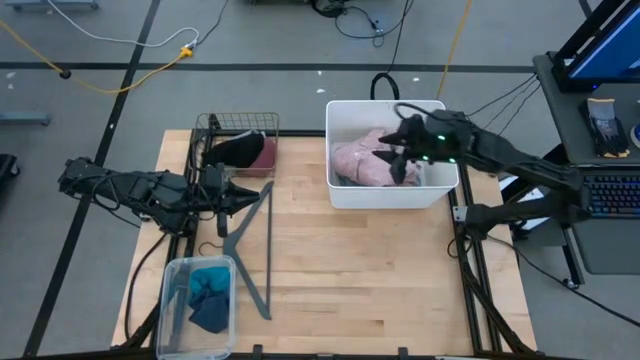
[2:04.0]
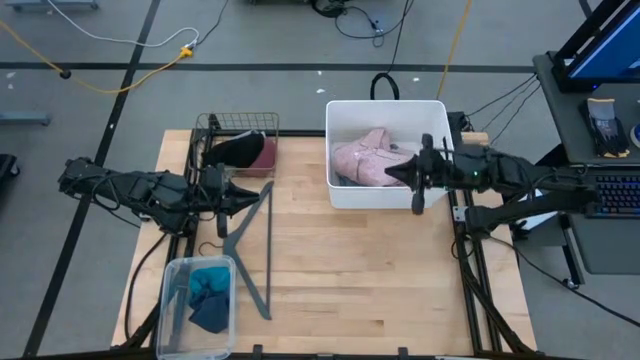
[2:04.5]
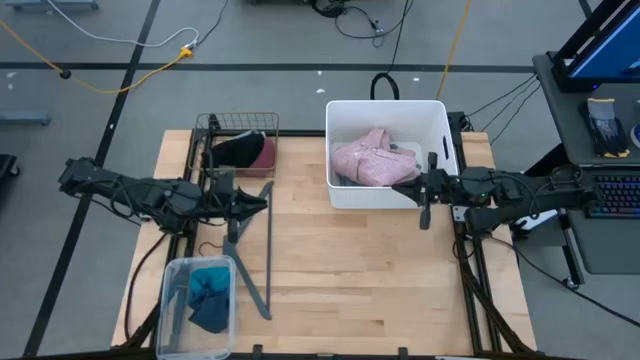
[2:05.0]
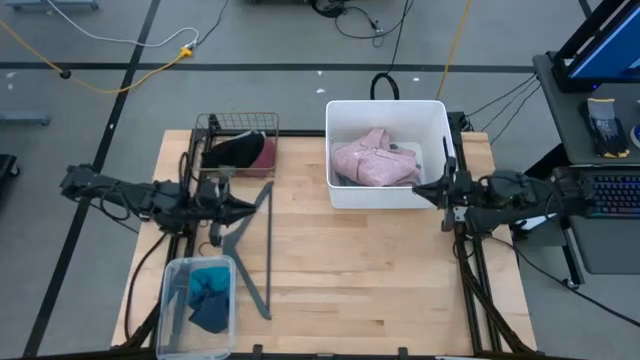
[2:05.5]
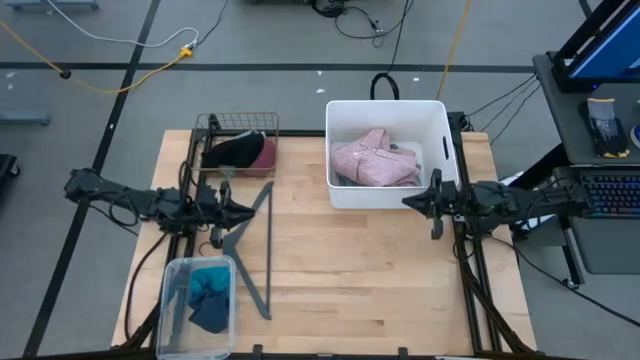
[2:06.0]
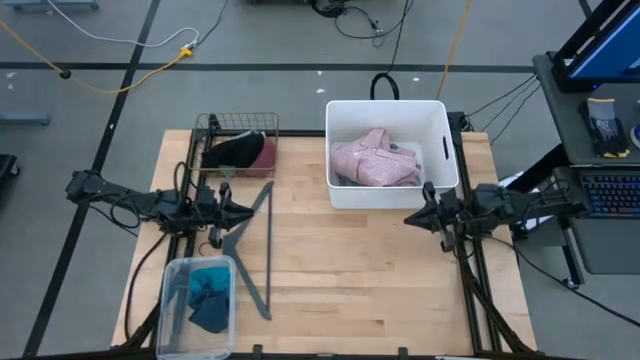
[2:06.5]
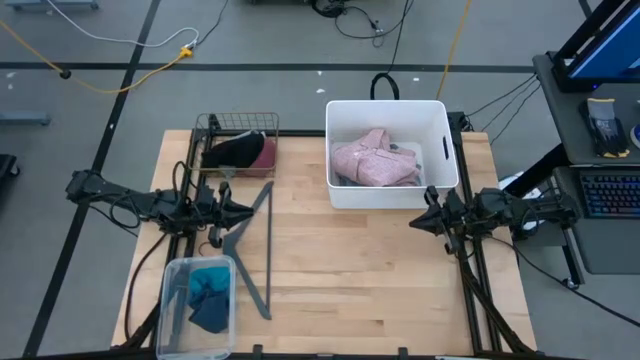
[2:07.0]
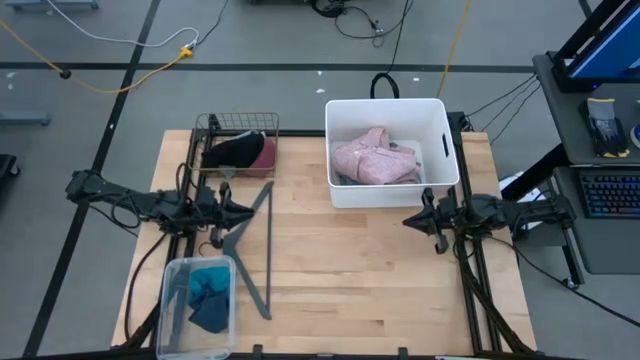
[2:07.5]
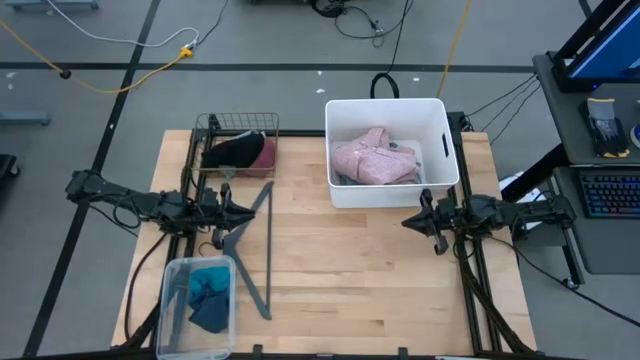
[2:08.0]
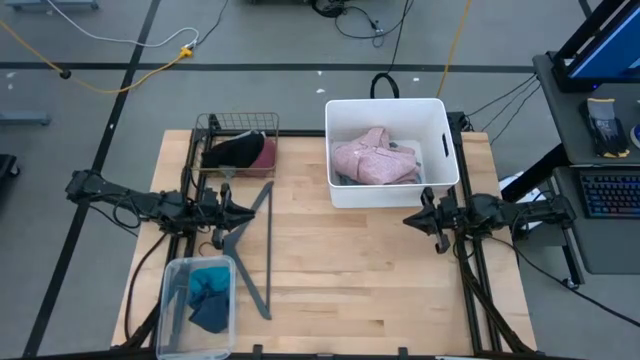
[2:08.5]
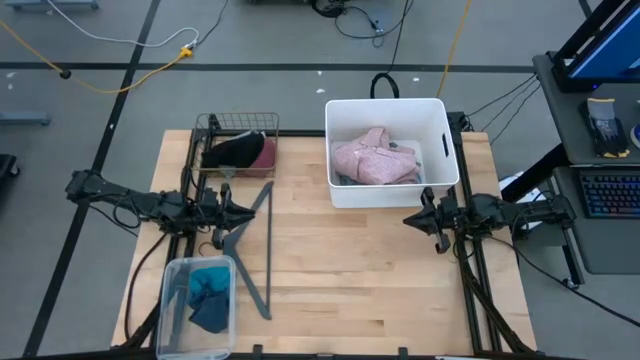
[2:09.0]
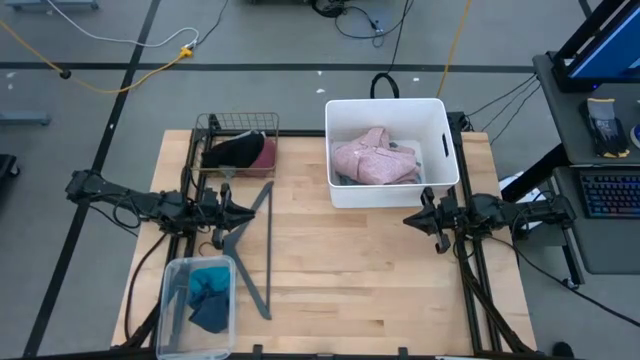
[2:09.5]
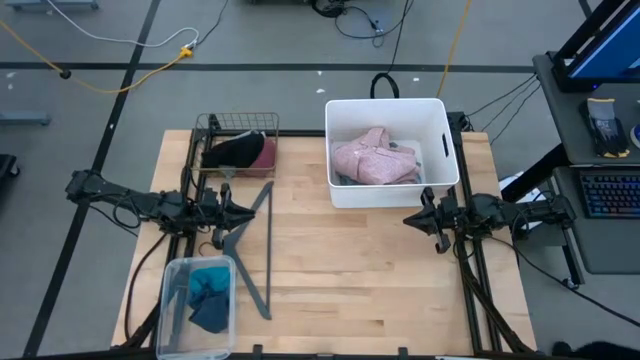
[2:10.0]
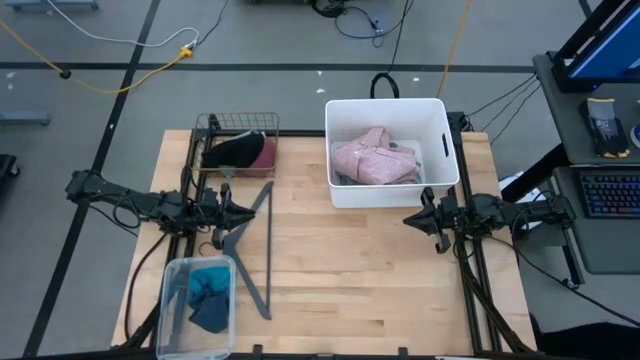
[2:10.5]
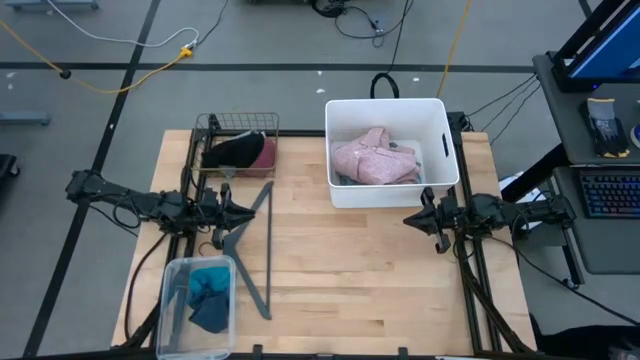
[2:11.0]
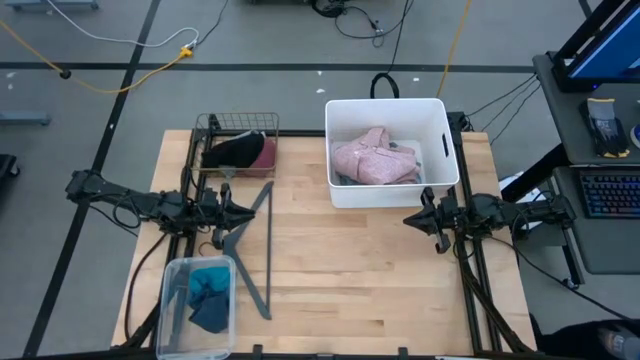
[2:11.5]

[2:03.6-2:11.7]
Task: Pick & Place Cloths
Return to Home Position

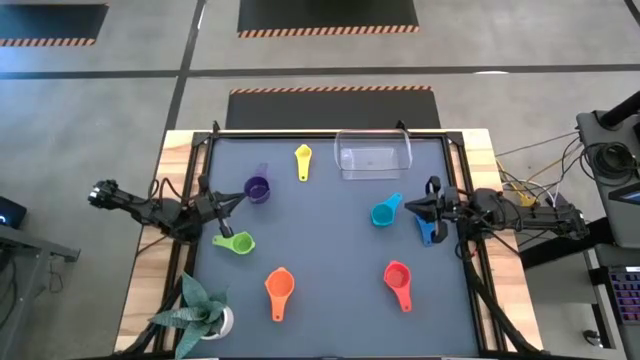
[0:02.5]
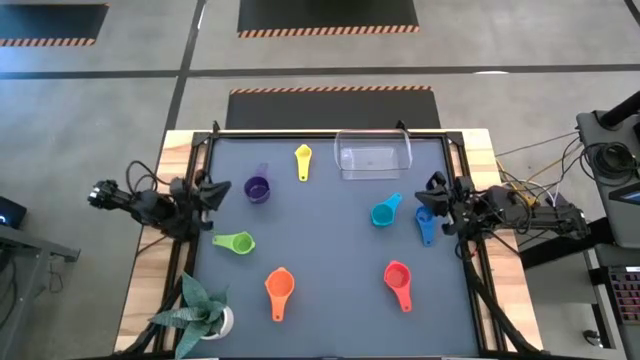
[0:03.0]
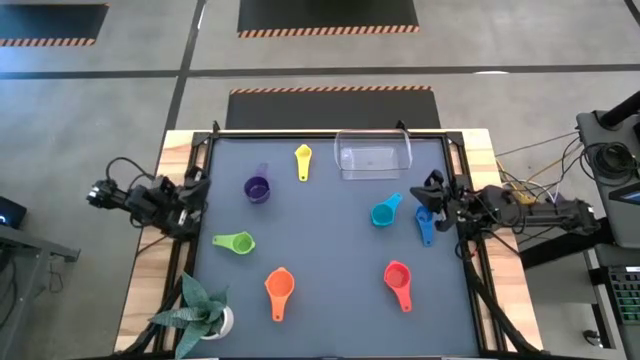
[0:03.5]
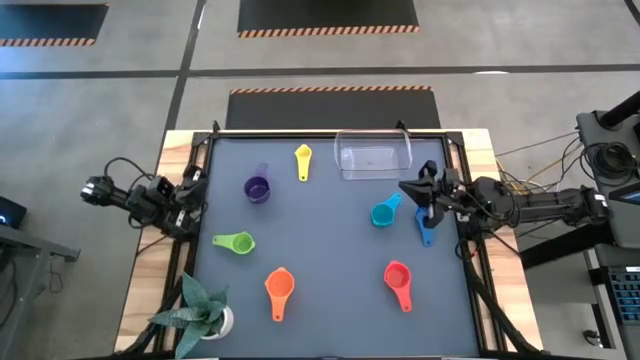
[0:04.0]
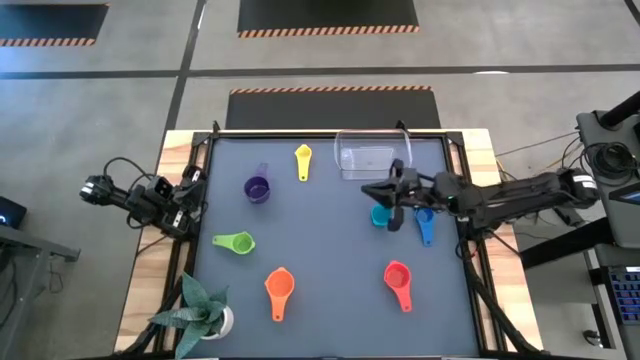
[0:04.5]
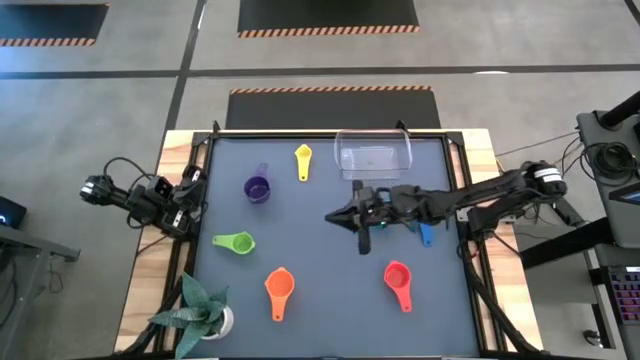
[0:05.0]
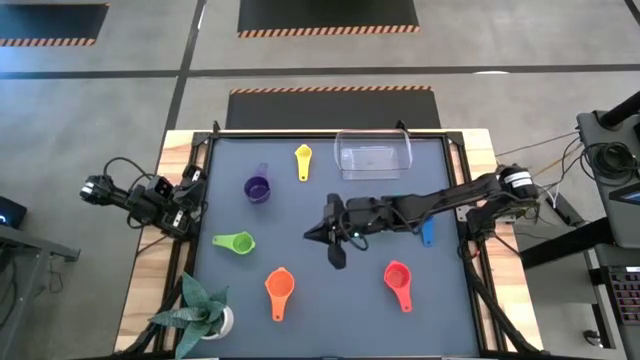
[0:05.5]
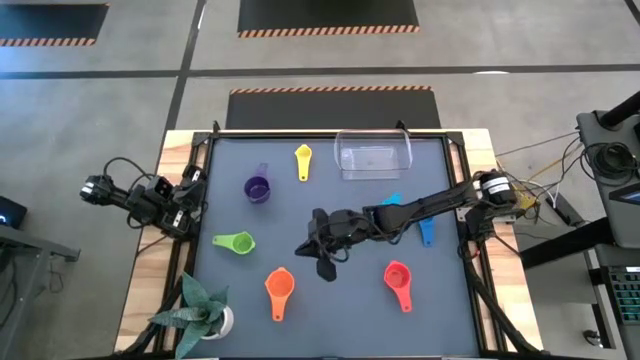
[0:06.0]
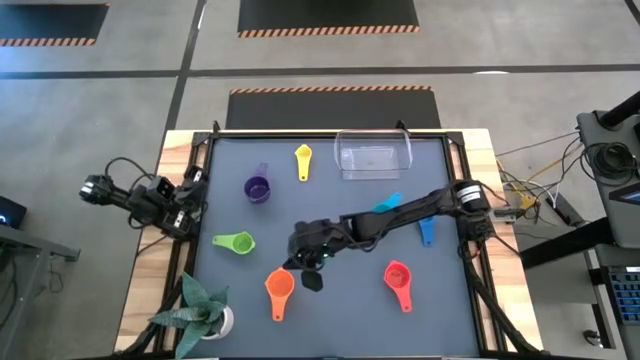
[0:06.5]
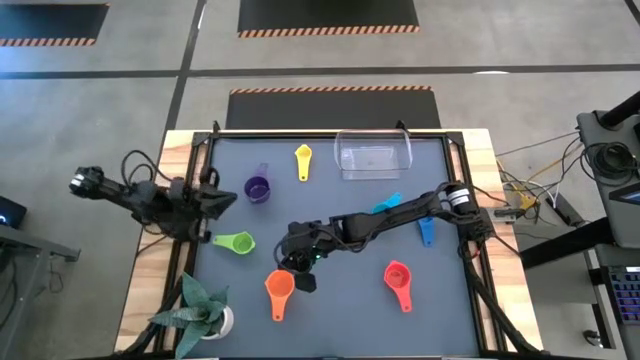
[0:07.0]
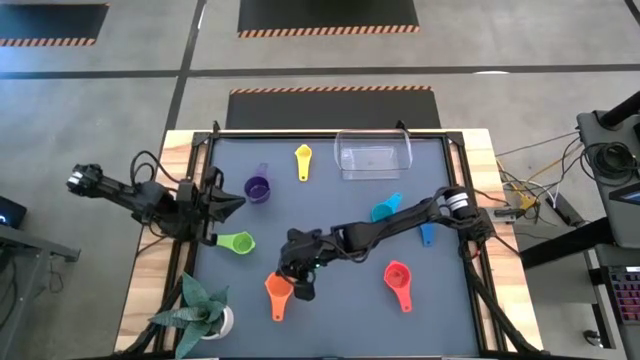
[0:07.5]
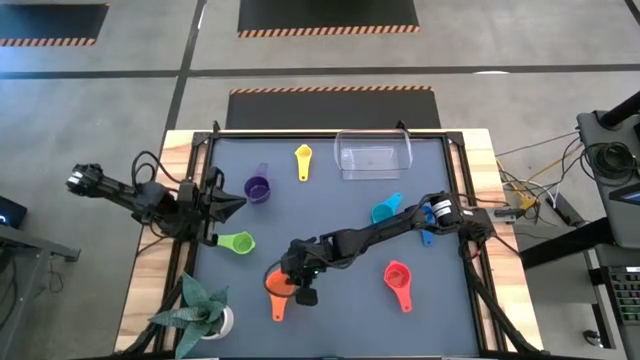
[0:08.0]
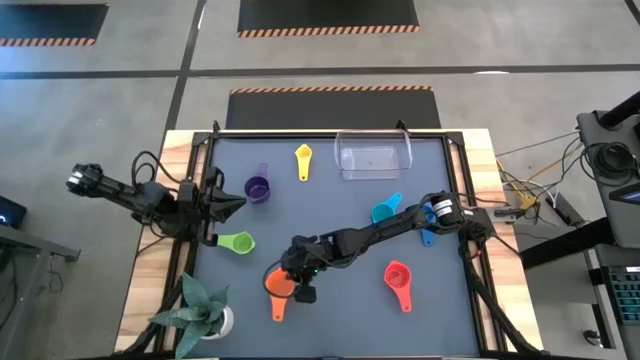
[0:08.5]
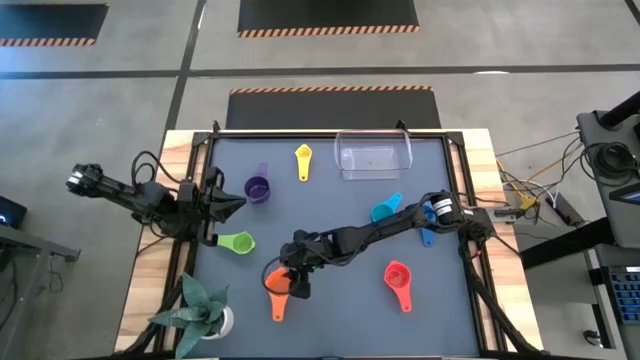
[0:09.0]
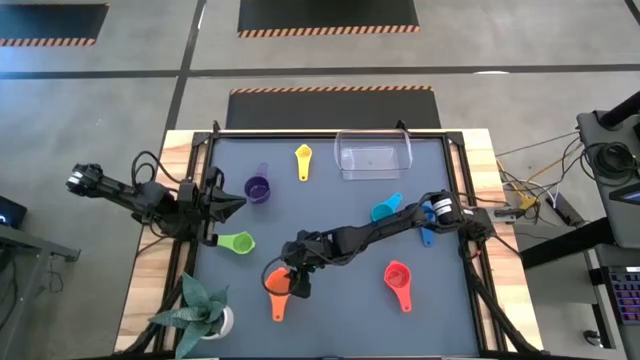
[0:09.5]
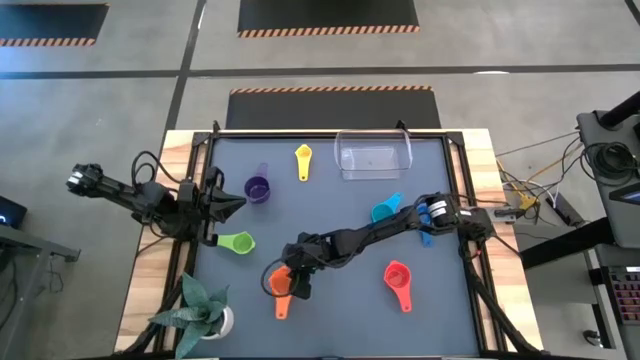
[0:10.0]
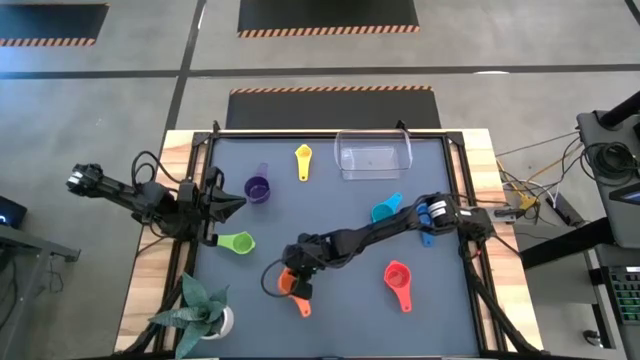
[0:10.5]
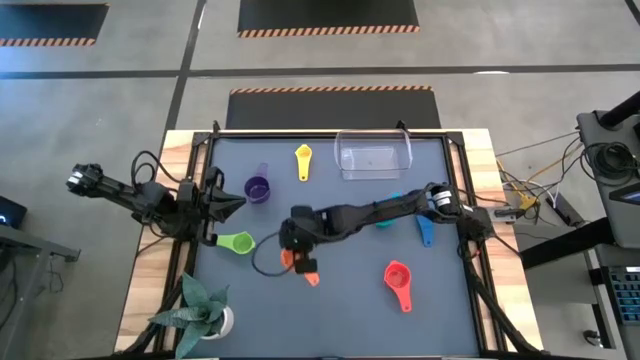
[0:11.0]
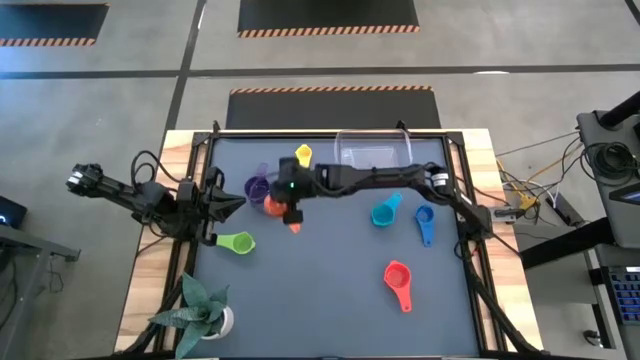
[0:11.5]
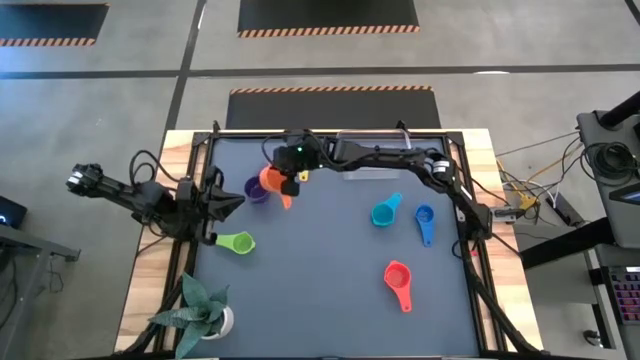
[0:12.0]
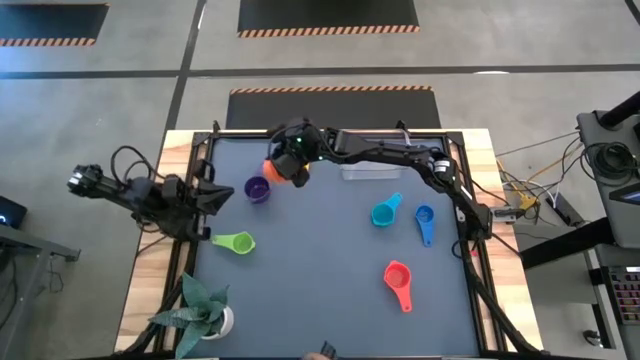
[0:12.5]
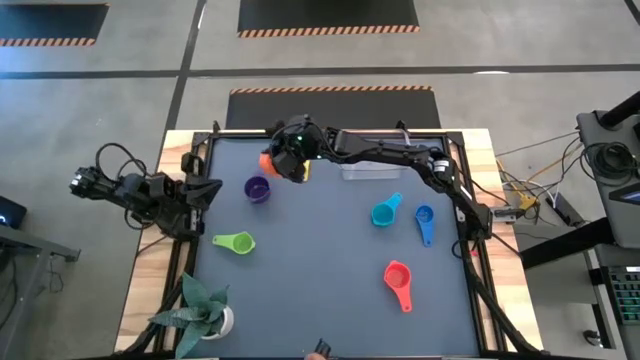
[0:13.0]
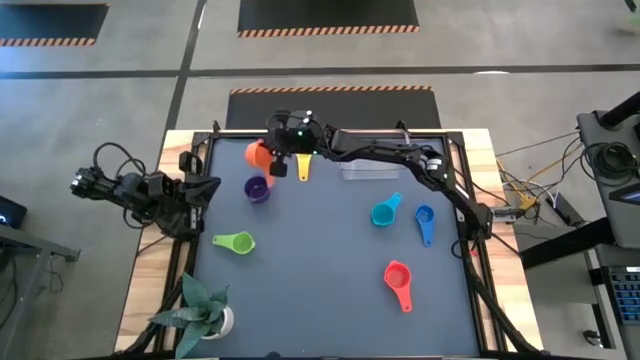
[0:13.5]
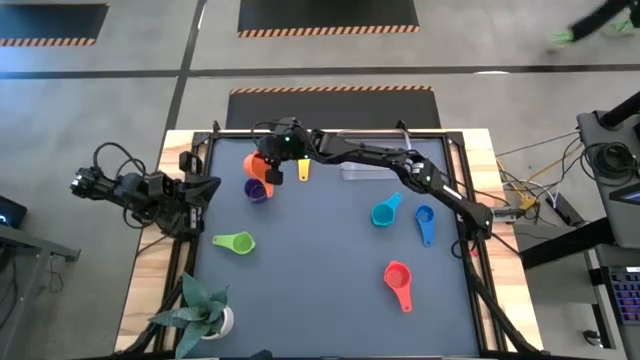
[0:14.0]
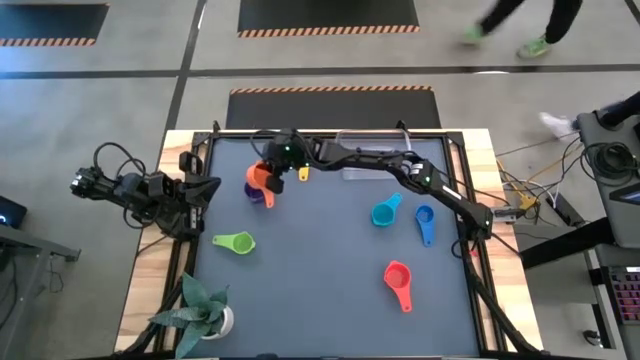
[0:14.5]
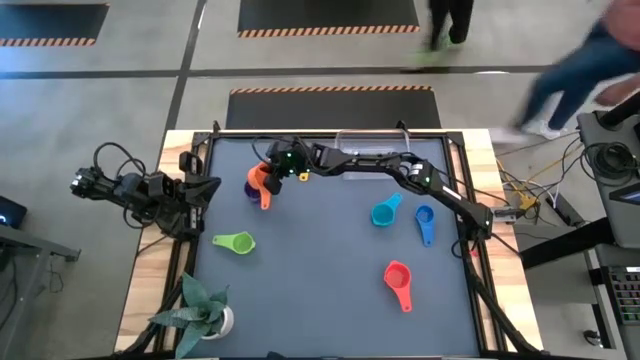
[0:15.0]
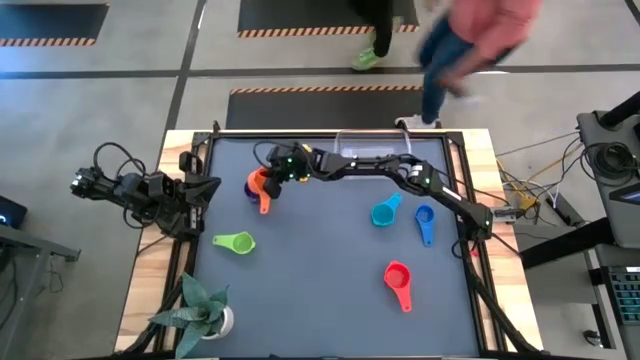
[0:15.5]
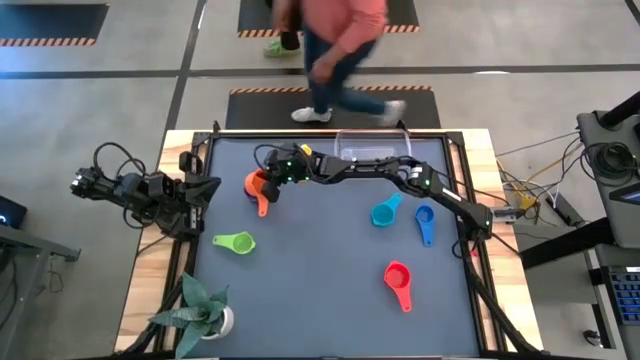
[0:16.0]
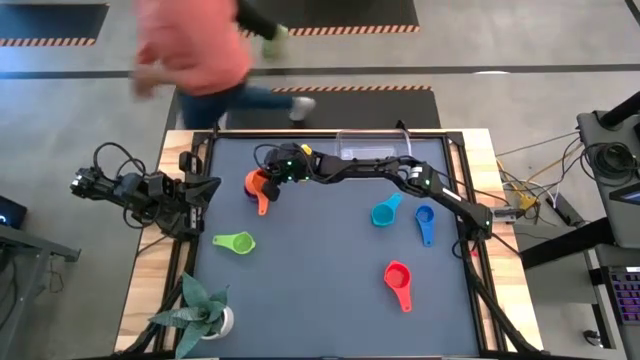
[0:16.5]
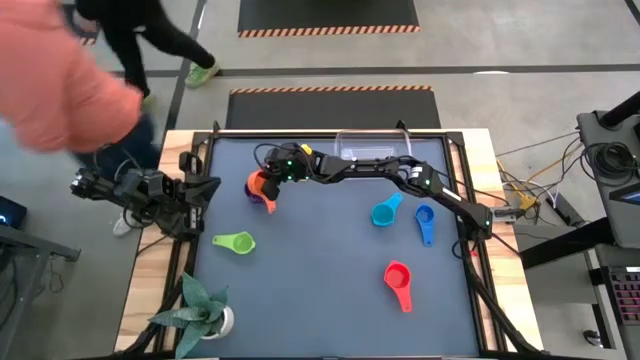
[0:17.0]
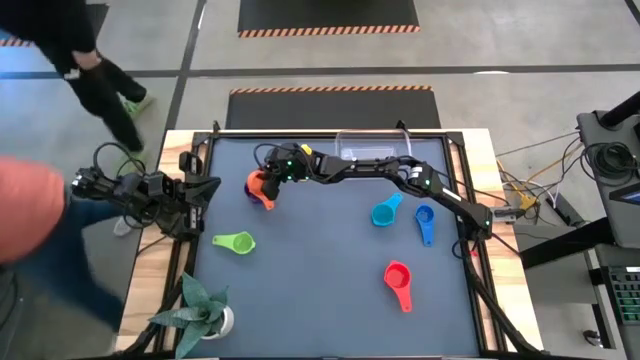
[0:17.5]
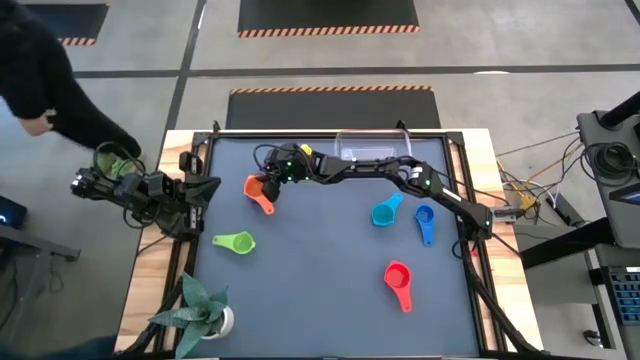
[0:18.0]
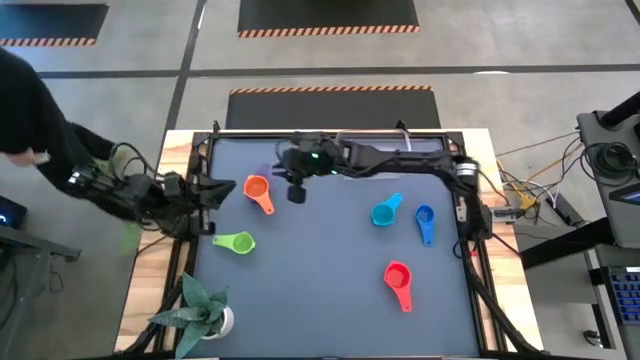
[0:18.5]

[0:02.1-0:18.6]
Task: Nest measuring cups in basket
Stack the orange measuring cup on top of the violet measuring cup
